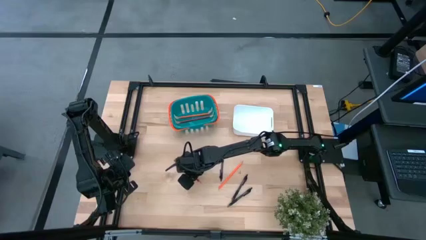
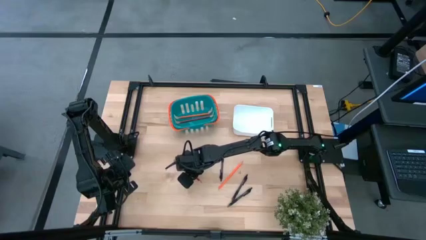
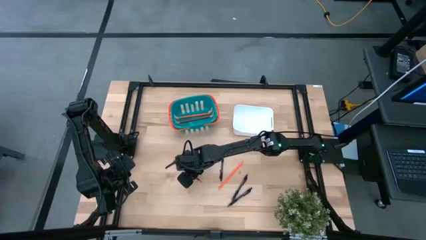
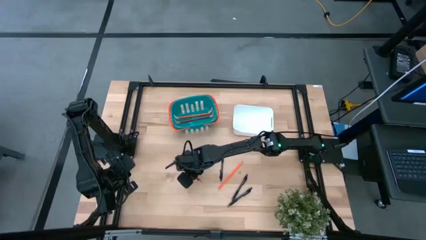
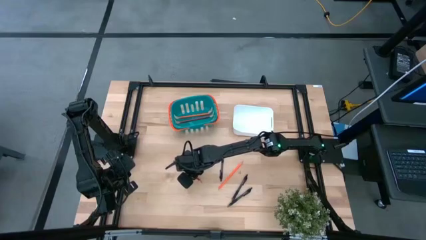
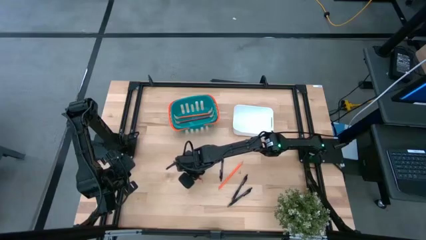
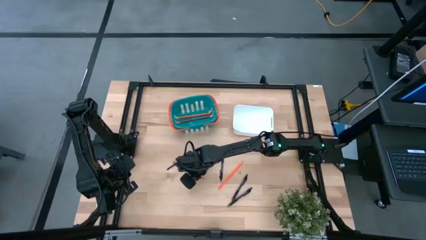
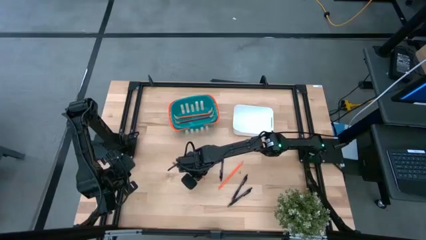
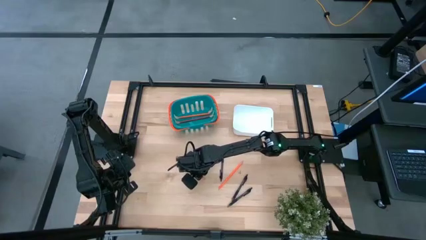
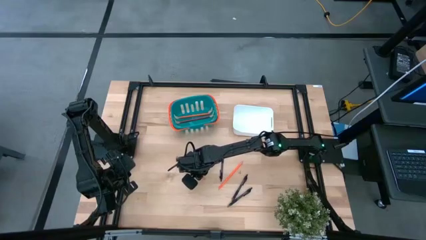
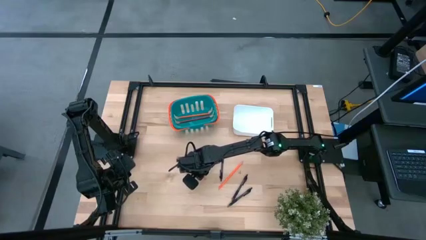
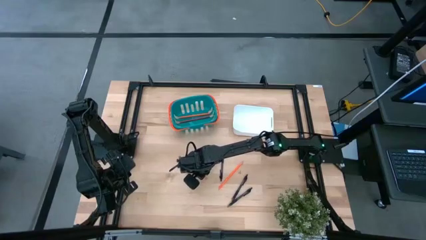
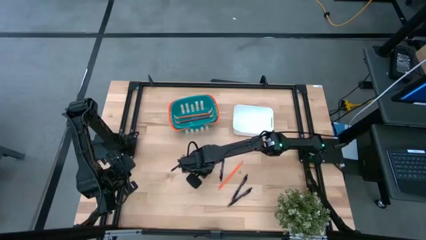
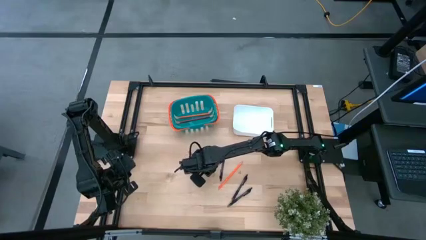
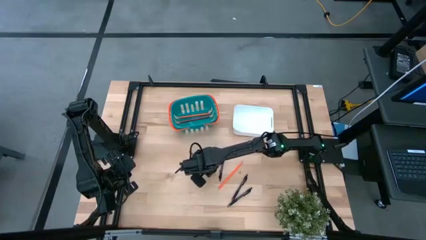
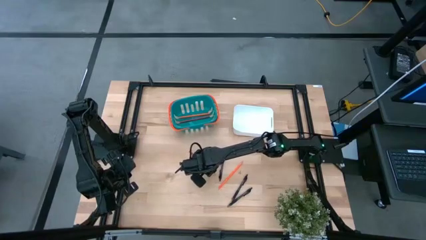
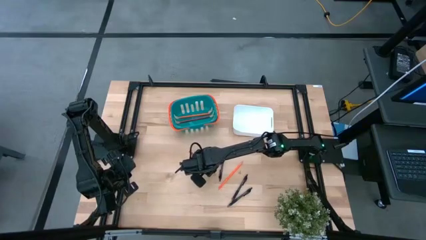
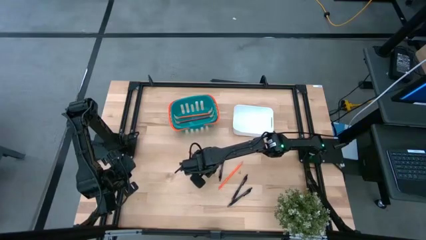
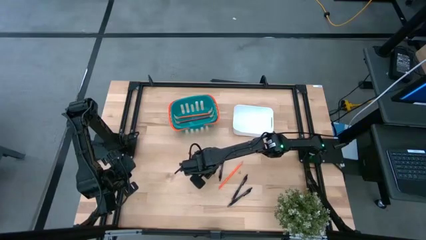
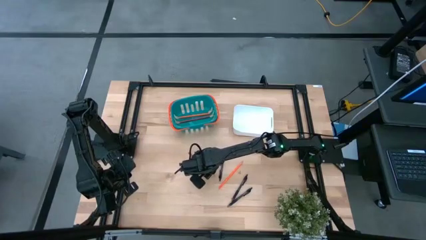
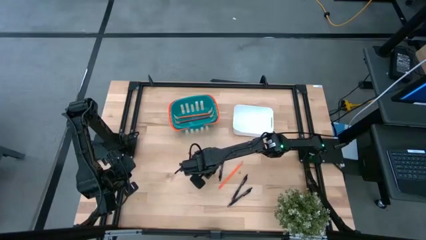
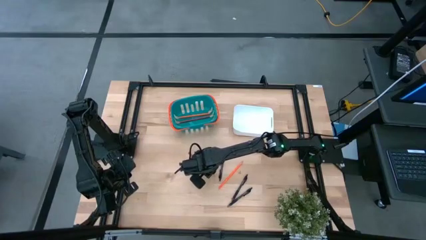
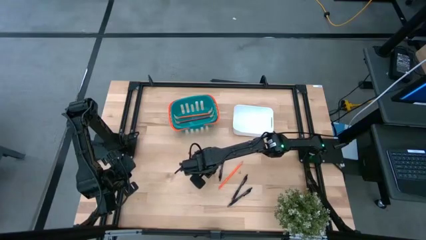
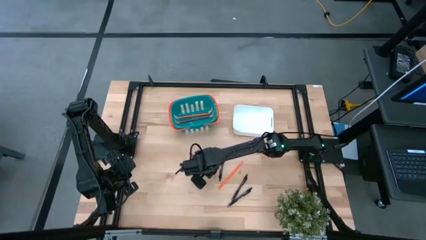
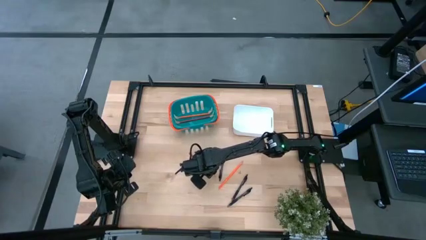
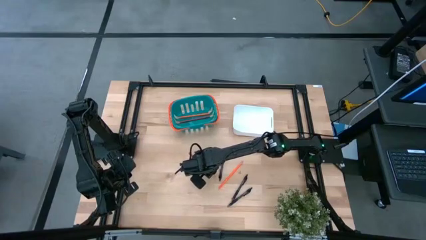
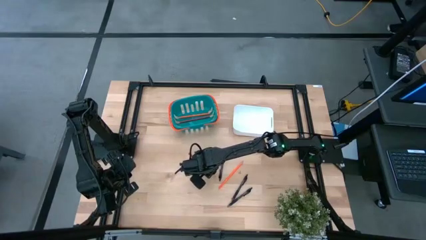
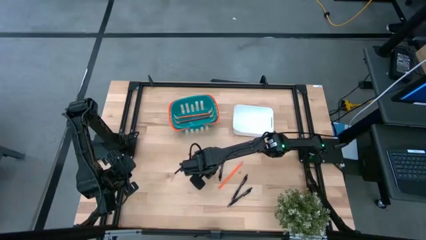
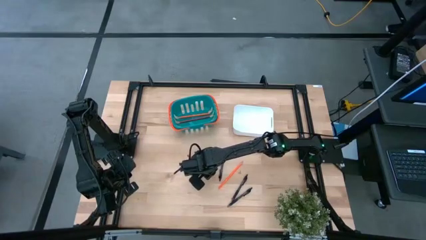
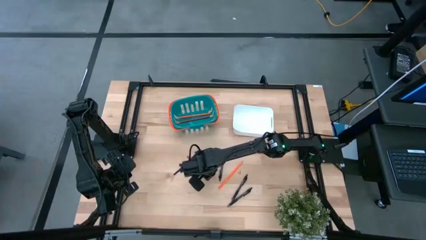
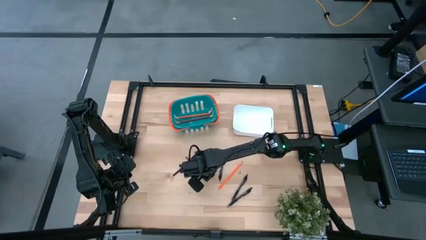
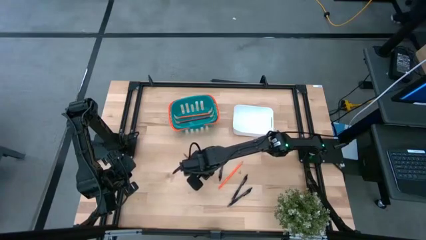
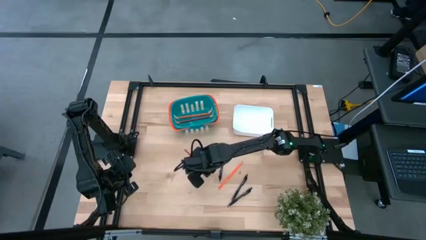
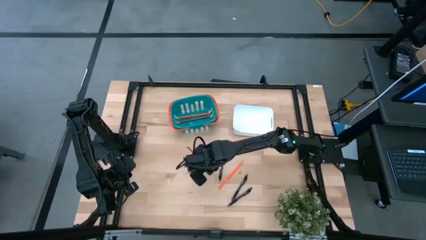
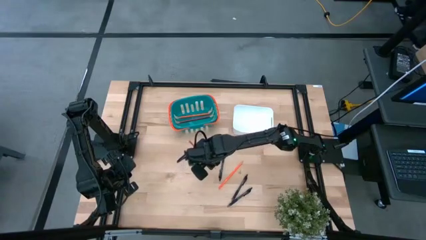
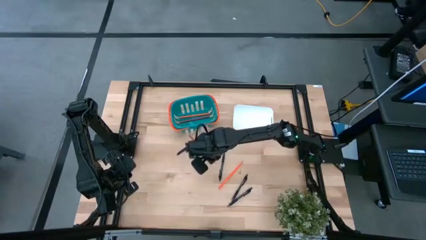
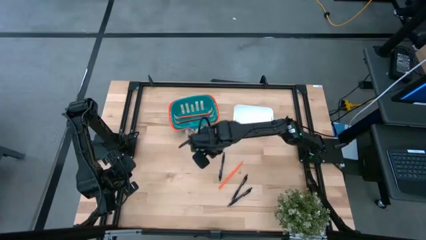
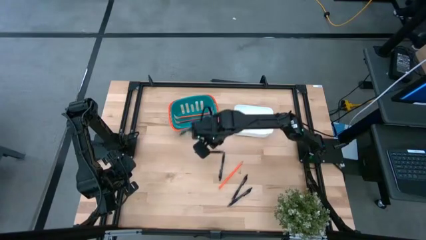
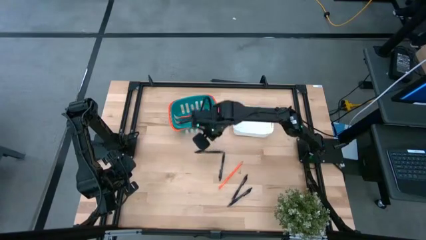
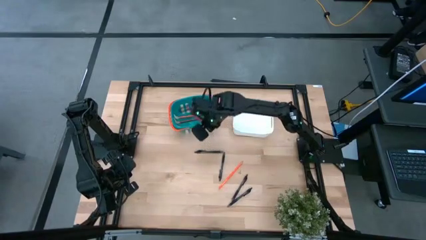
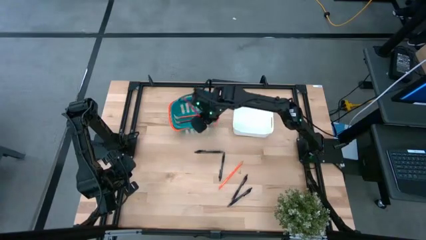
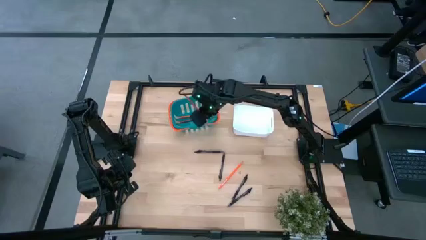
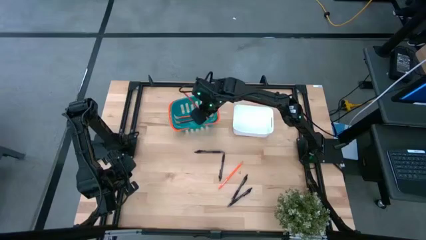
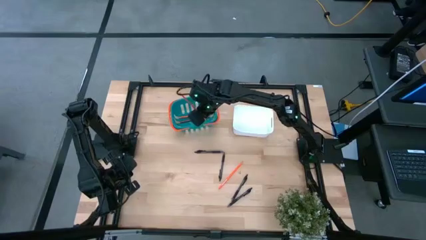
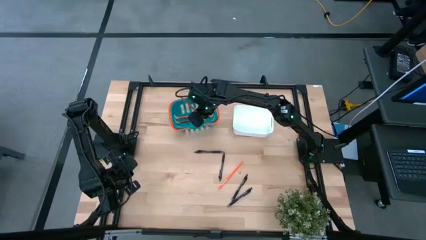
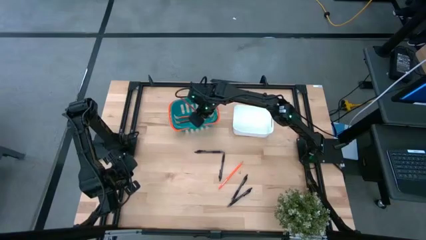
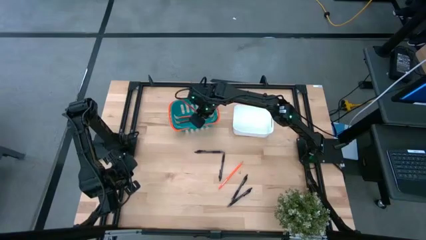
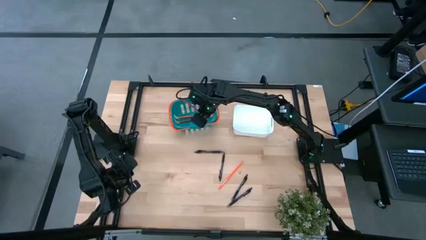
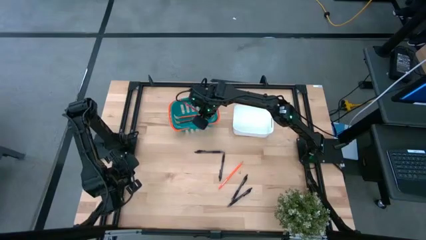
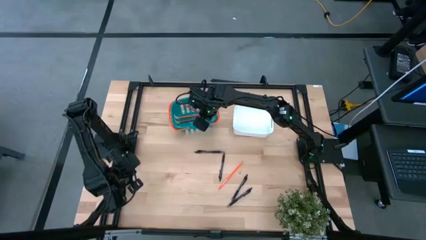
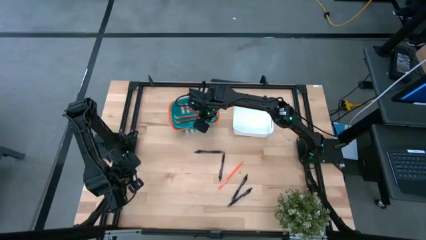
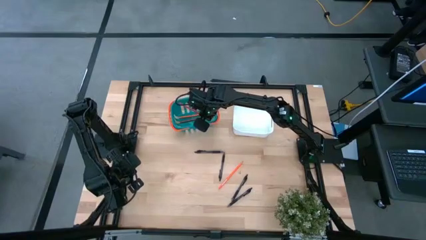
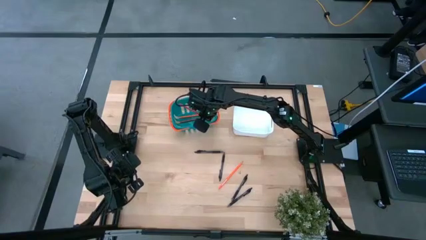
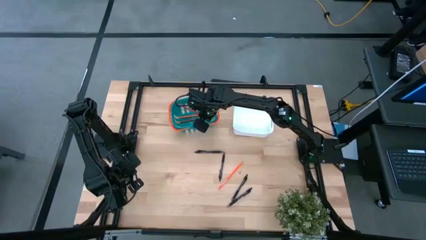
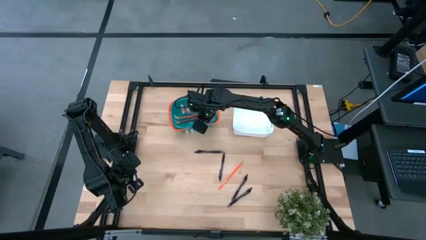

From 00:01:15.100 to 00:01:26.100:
Task: Sort pens & pencils
Put the red pencil into the blue bin

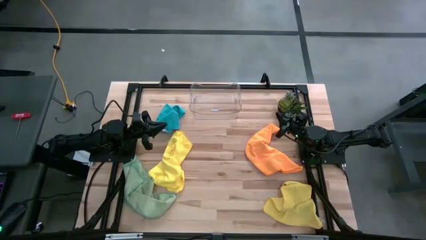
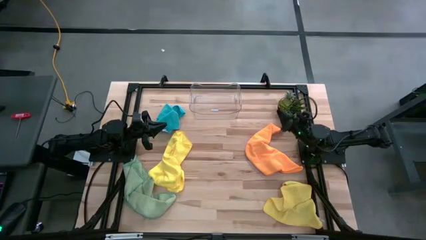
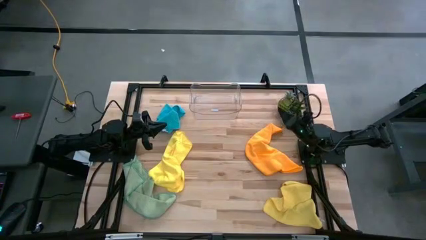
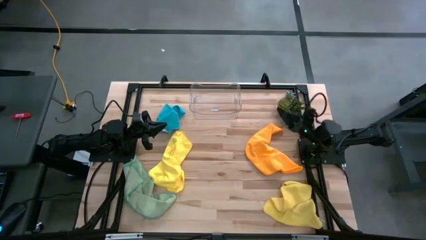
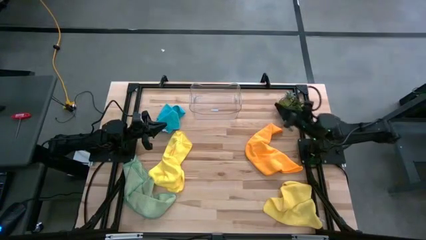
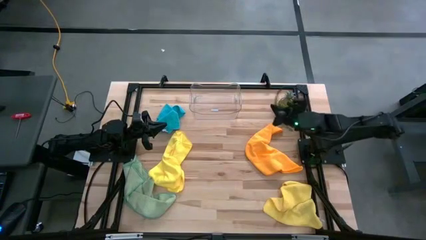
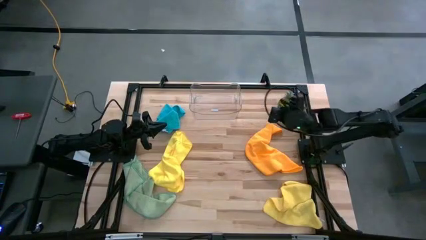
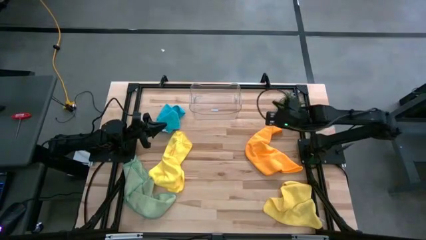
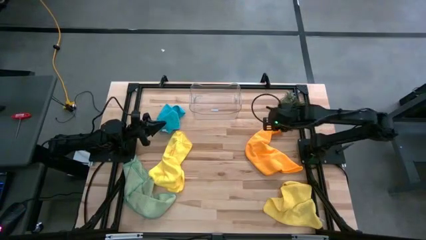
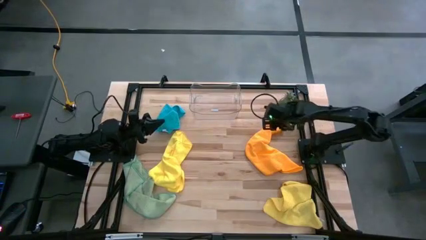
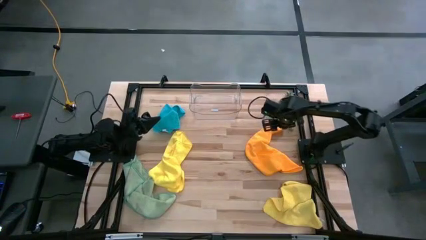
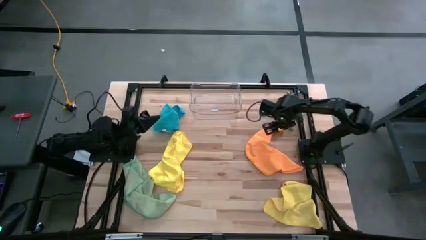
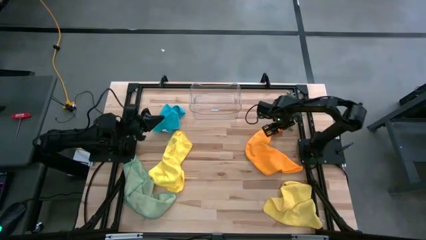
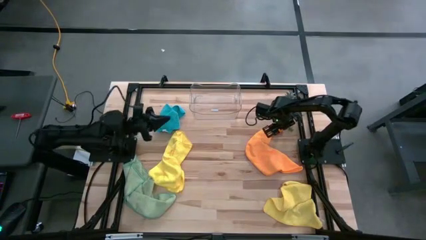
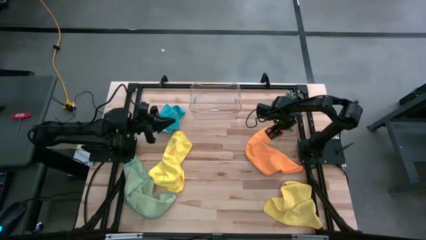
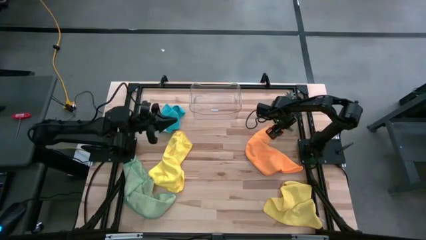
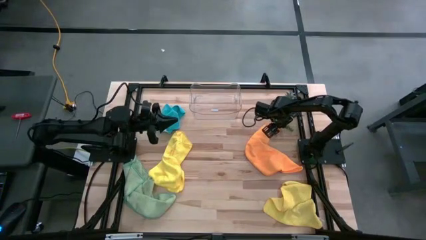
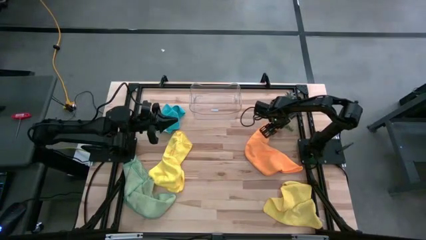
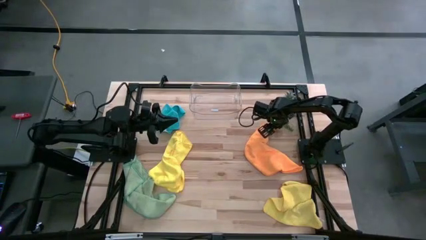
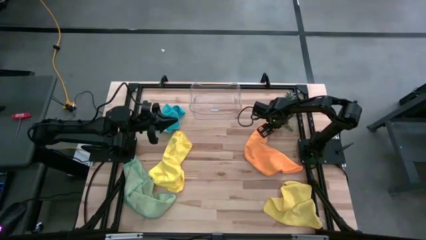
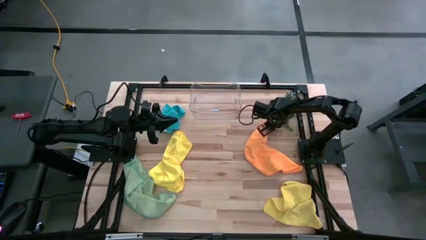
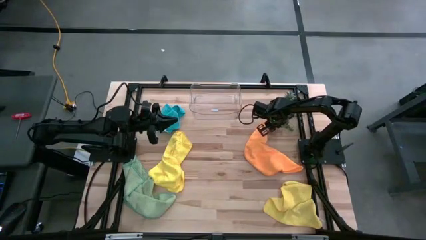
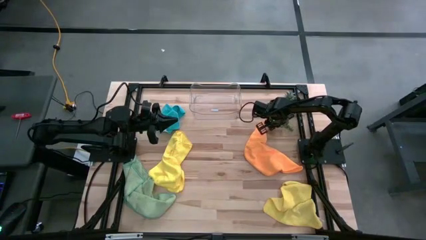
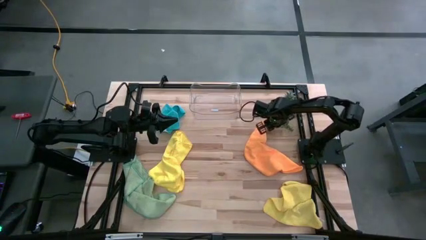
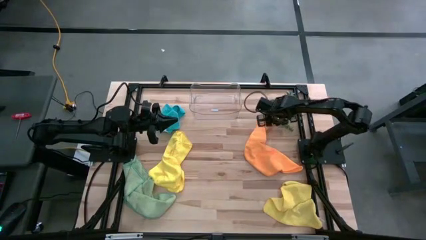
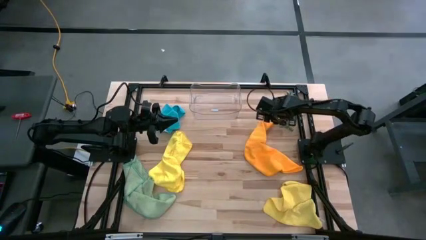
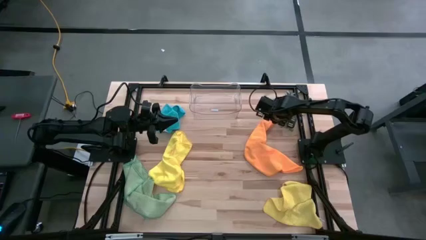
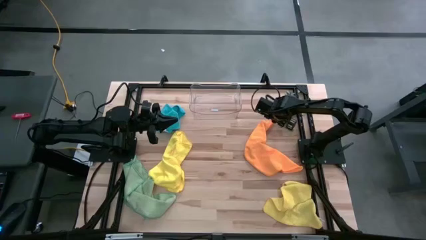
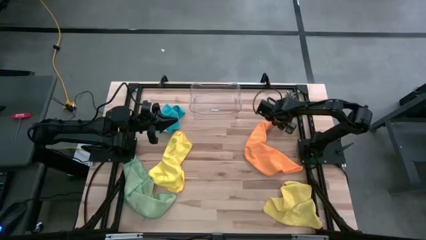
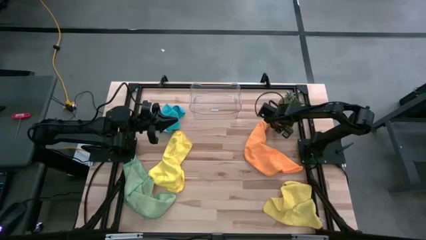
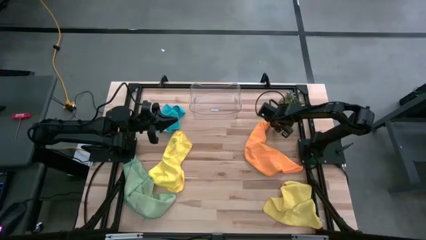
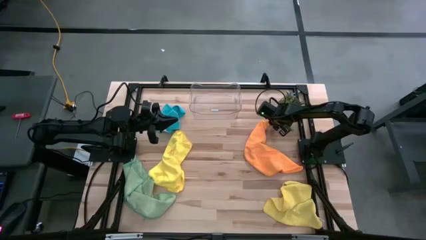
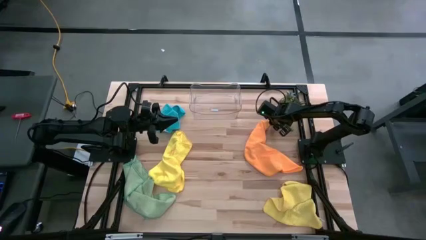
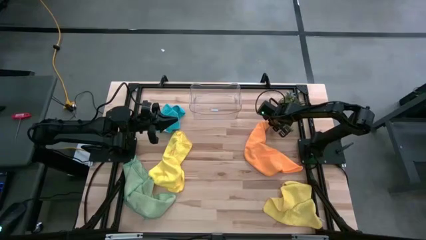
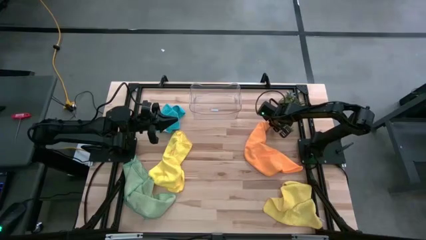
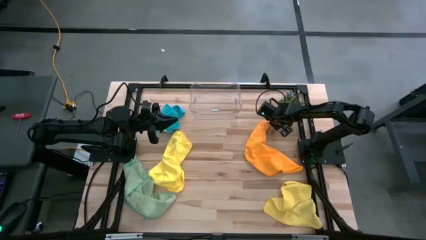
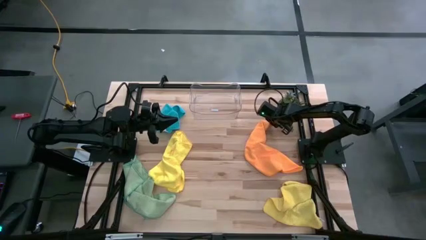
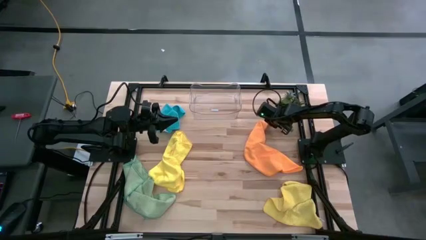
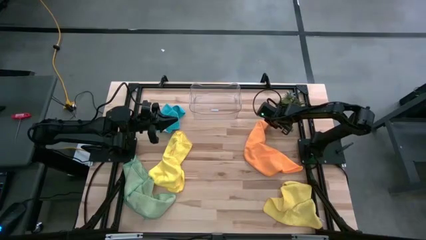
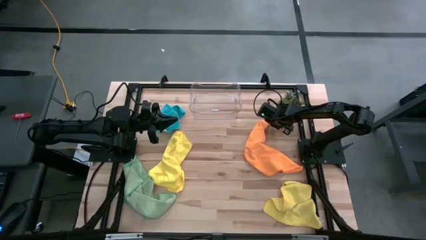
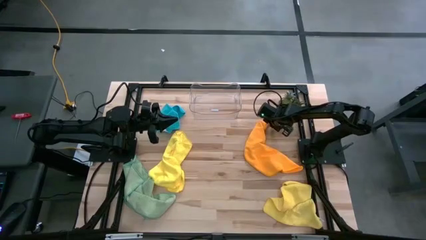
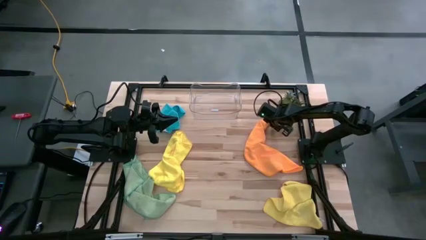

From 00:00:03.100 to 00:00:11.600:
Task: Fold microfiber towels
Fold the orange microfiber towel
